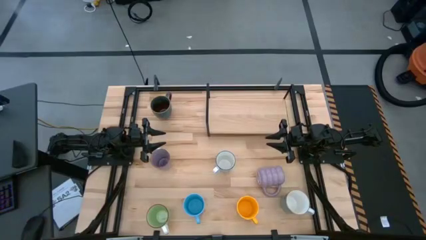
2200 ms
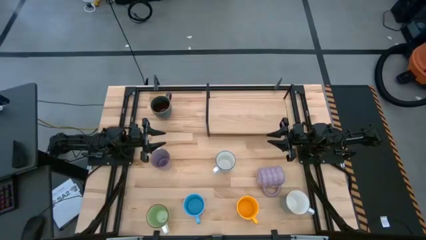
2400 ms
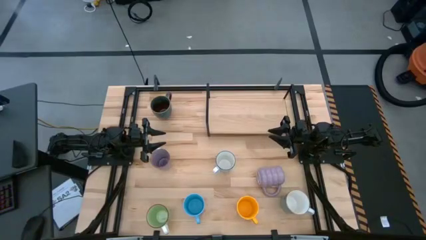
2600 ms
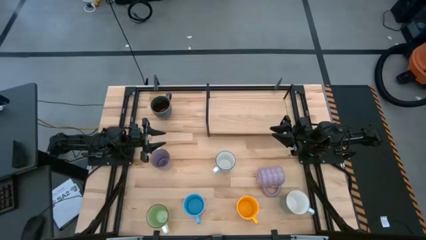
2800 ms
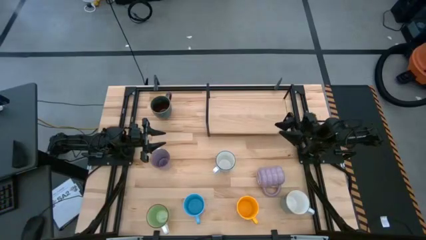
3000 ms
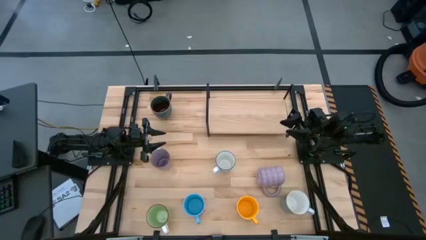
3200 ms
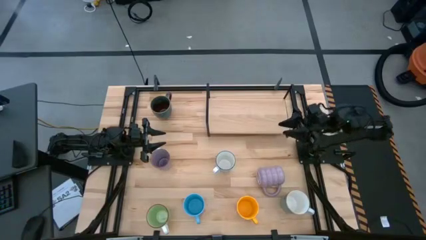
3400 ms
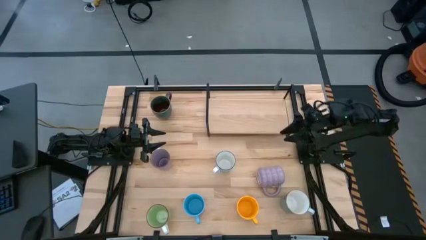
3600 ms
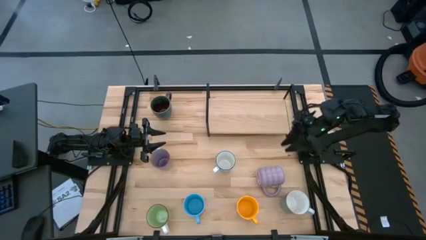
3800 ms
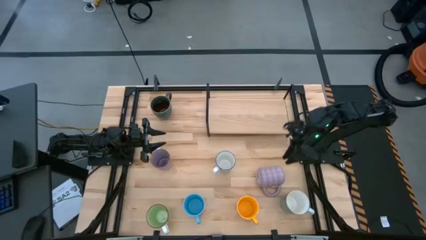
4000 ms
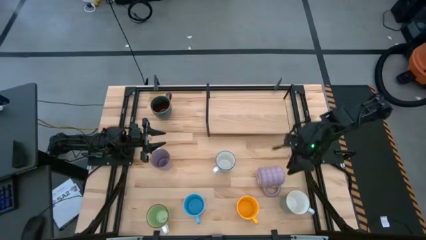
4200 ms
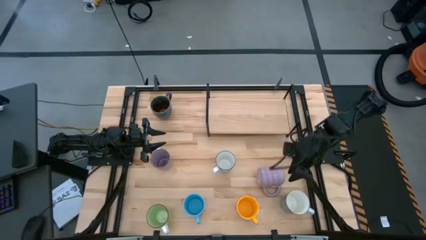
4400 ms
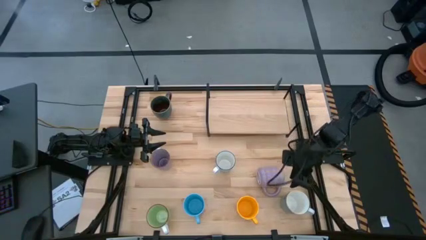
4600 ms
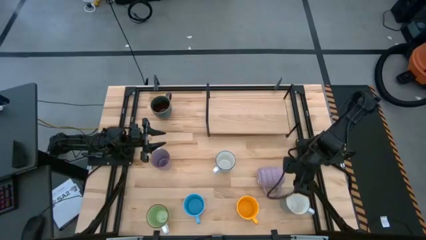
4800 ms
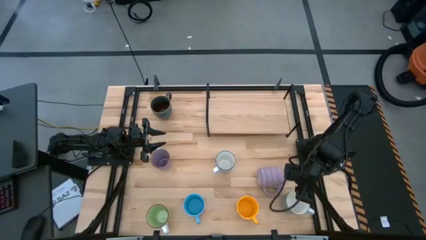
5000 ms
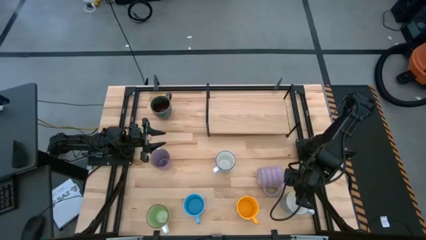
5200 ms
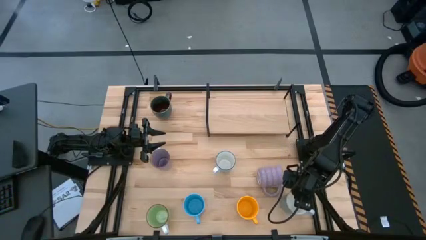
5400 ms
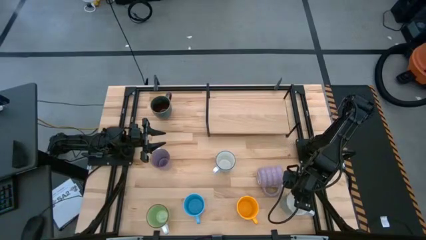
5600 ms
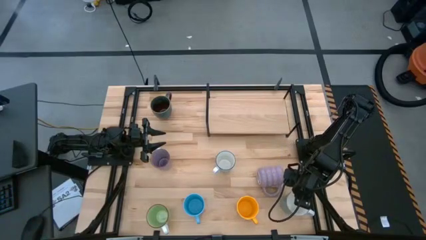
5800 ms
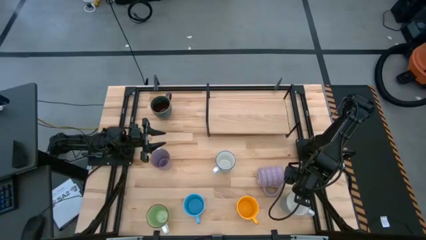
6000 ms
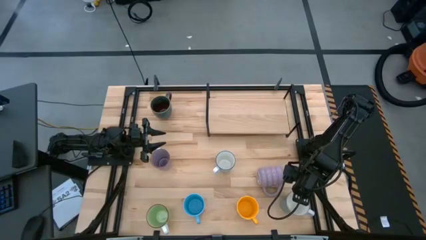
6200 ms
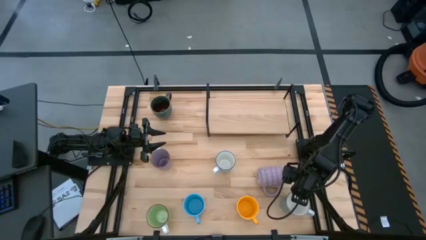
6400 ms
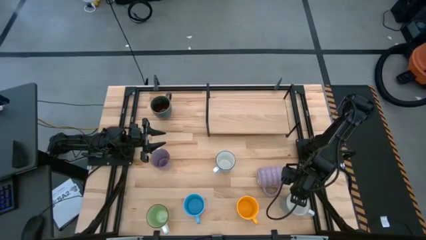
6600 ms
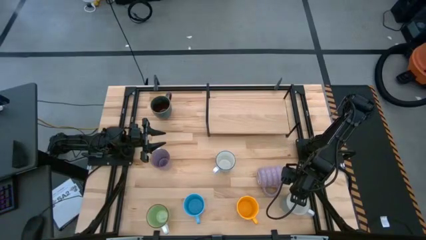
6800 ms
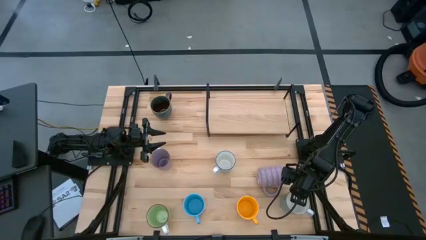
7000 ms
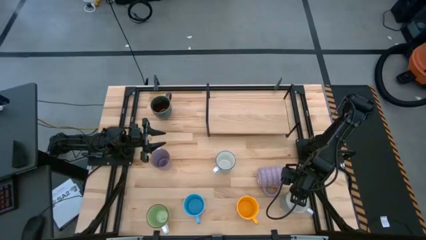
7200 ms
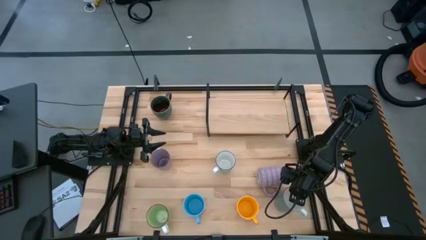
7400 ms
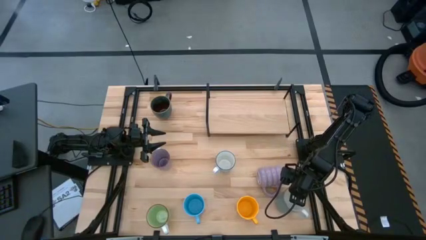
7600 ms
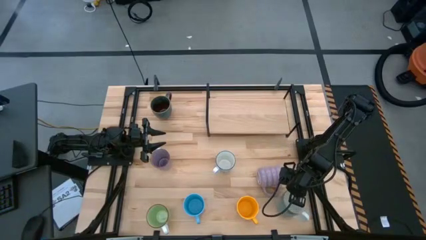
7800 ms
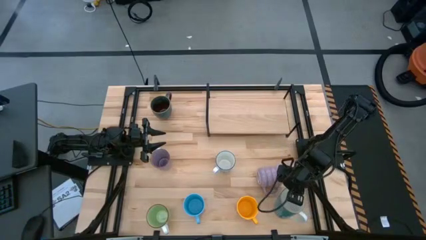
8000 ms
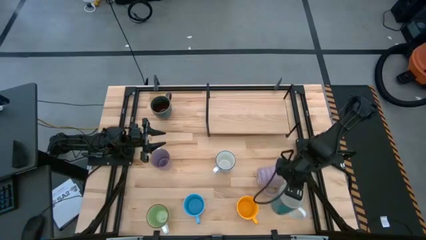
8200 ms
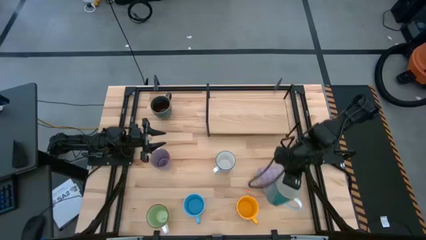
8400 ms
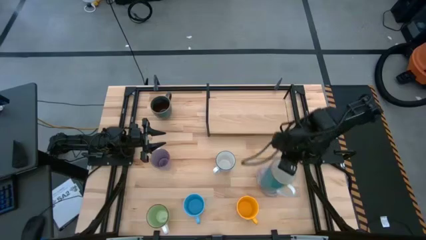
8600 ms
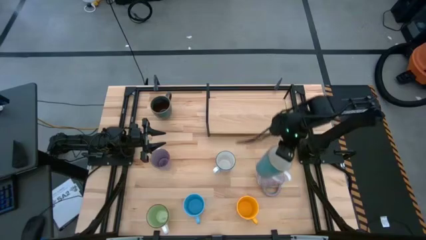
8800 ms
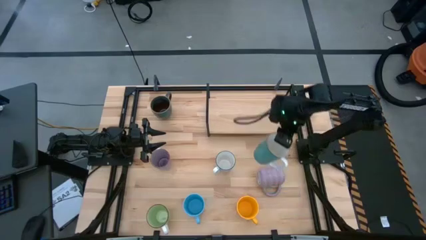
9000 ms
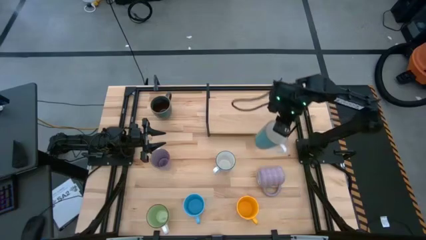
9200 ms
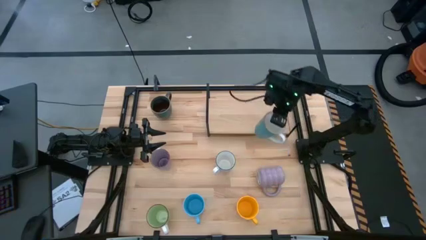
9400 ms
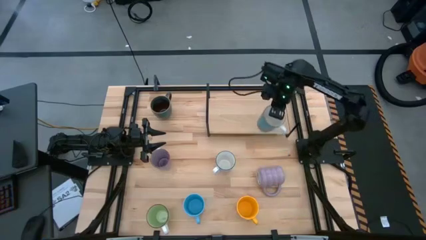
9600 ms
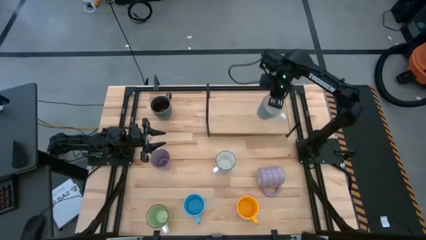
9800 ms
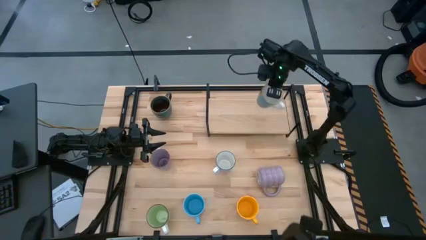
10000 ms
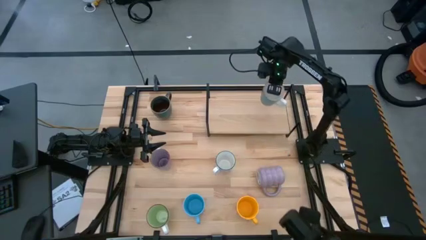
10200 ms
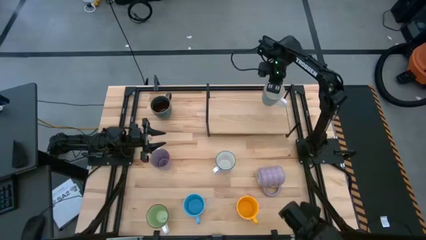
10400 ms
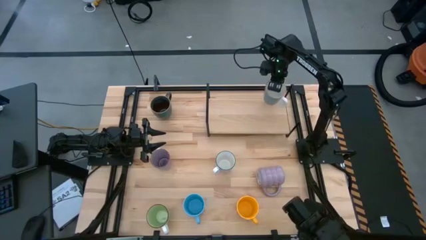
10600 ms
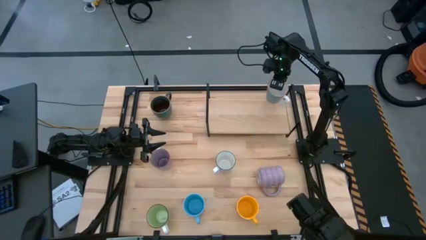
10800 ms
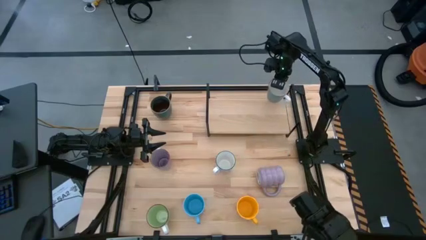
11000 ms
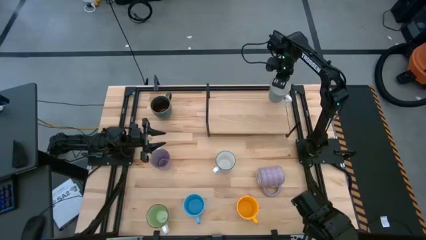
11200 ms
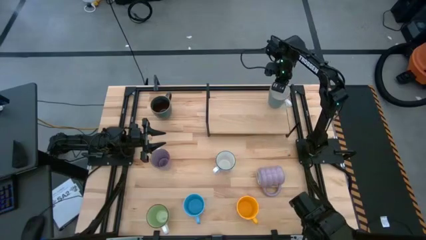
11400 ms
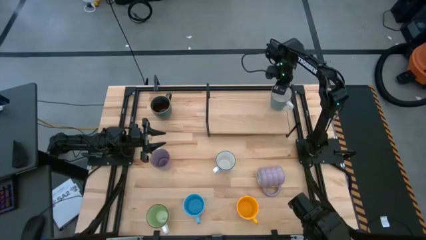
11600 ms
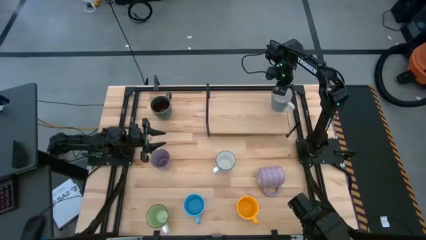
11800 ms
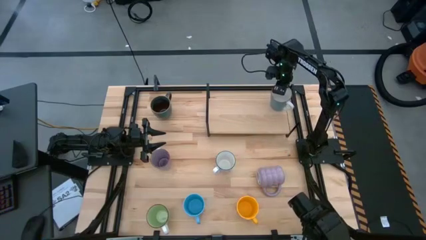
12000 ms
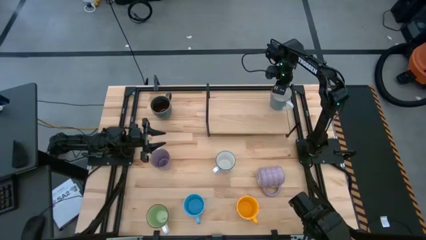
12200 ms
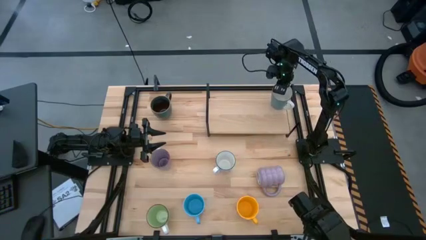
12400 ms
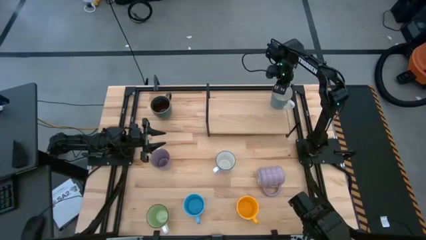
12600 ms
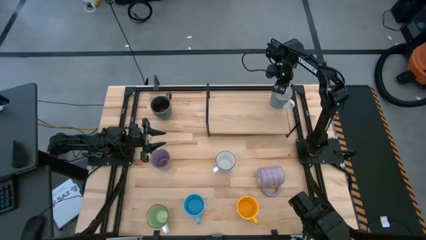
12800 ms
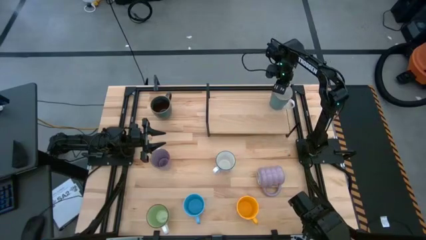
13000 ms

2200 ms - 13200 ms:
Task: Place coffee mugs
Put the light blue mug on the shelf

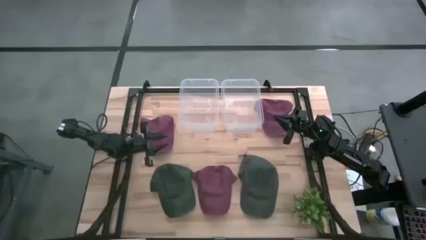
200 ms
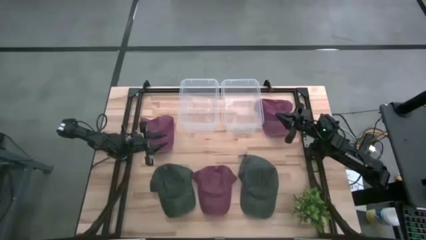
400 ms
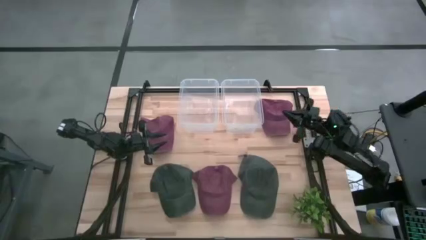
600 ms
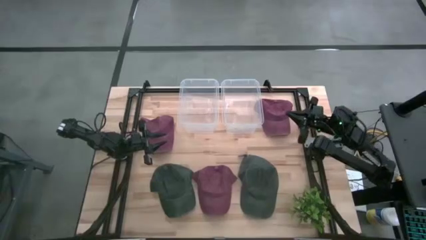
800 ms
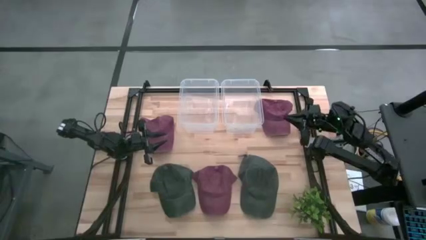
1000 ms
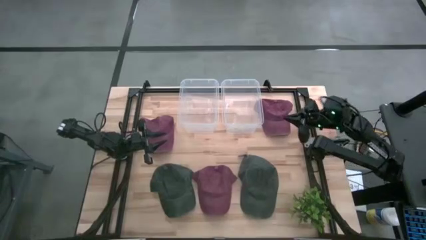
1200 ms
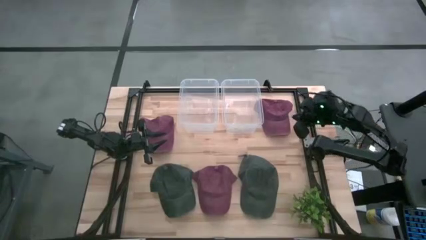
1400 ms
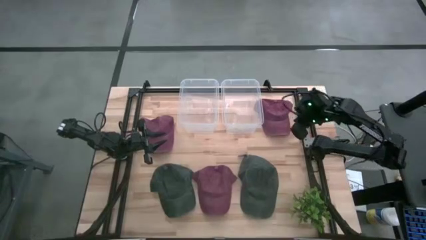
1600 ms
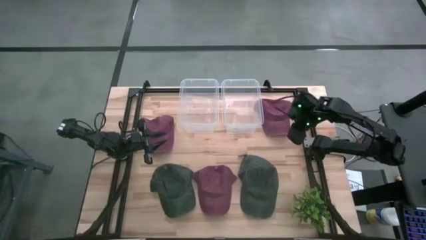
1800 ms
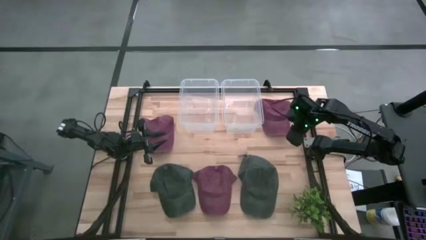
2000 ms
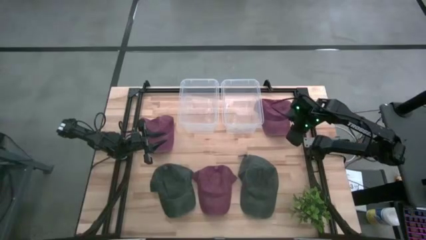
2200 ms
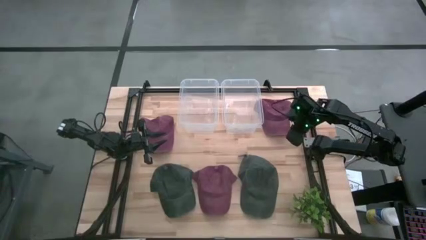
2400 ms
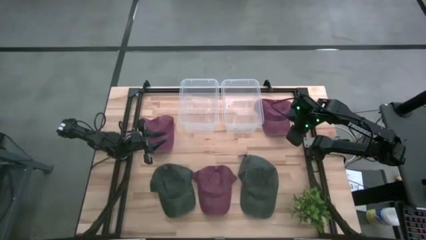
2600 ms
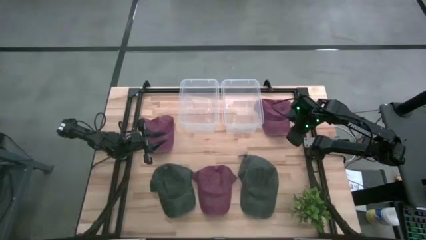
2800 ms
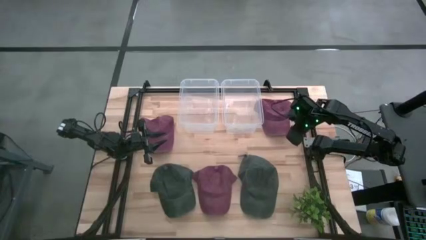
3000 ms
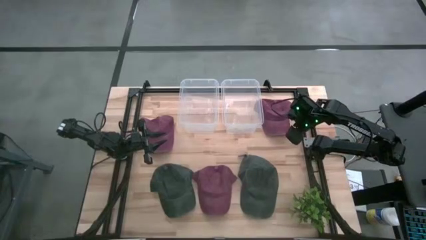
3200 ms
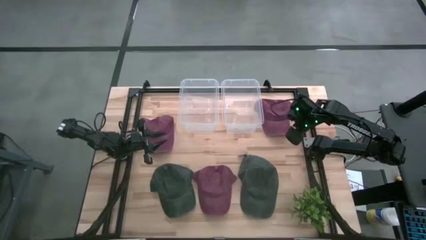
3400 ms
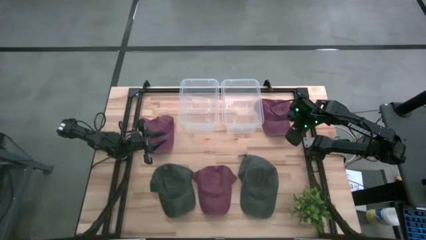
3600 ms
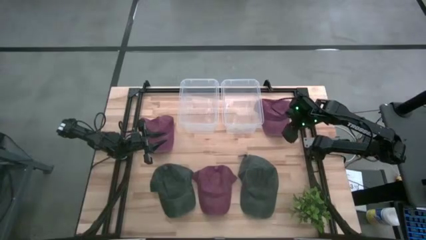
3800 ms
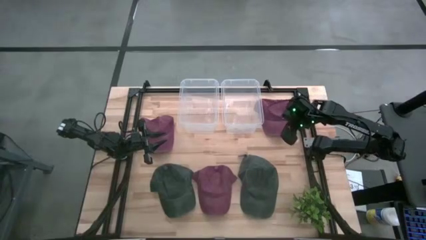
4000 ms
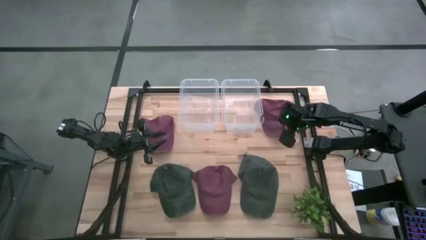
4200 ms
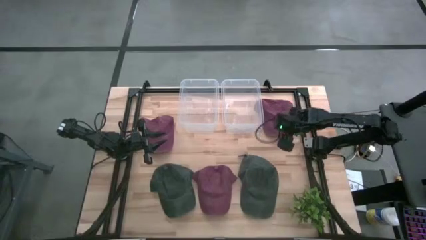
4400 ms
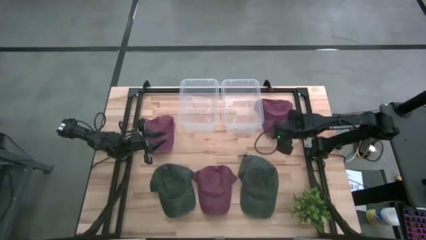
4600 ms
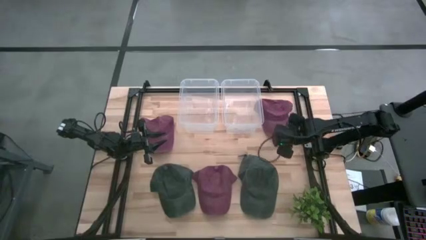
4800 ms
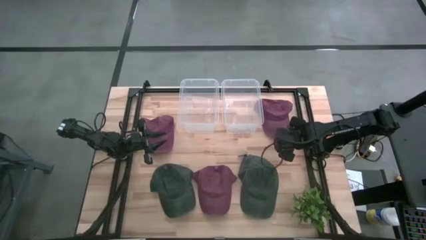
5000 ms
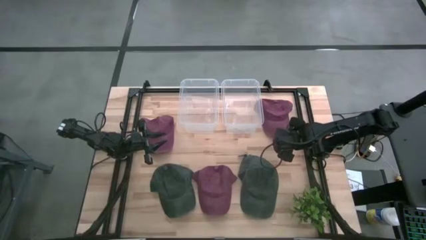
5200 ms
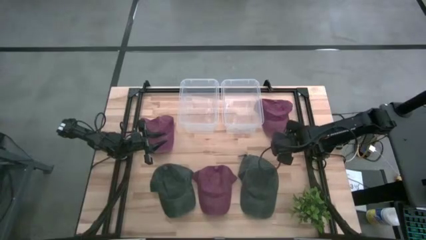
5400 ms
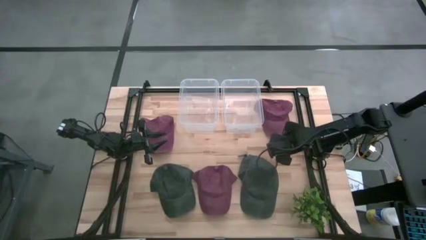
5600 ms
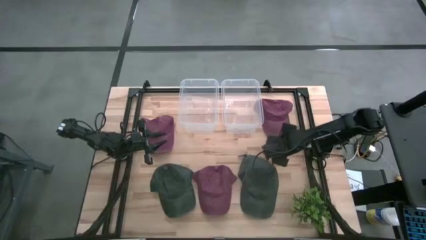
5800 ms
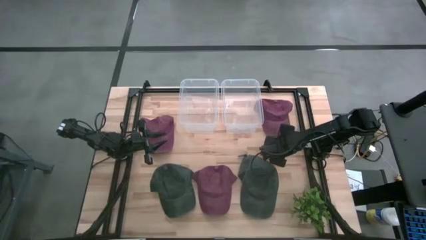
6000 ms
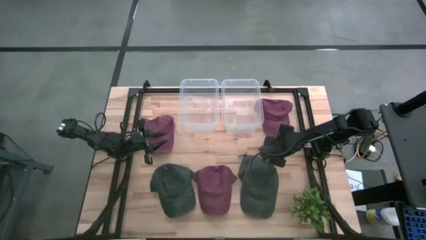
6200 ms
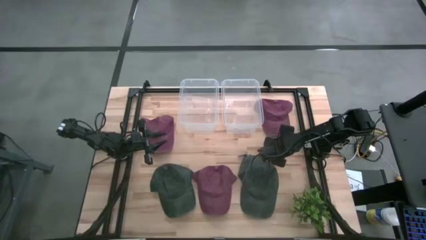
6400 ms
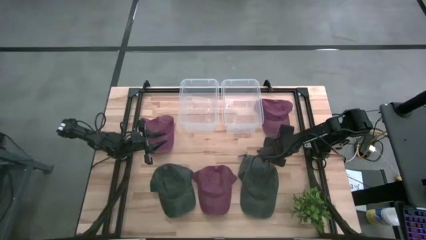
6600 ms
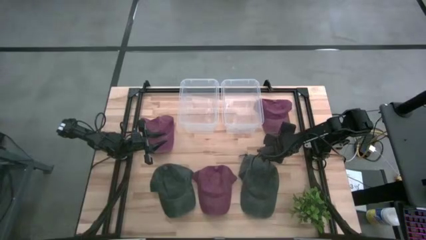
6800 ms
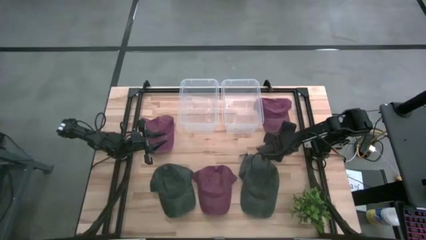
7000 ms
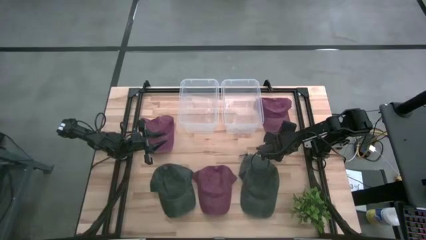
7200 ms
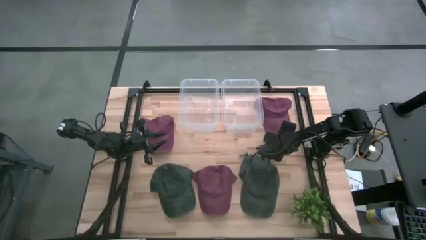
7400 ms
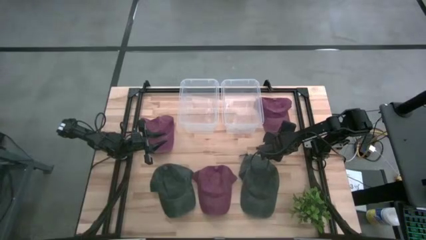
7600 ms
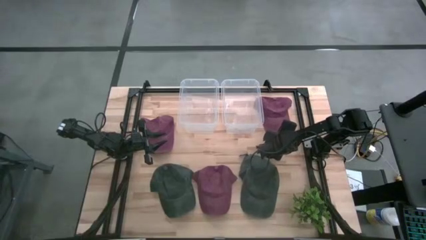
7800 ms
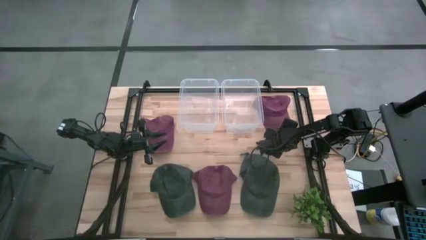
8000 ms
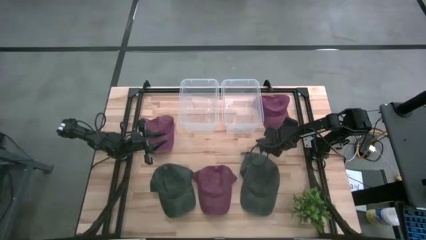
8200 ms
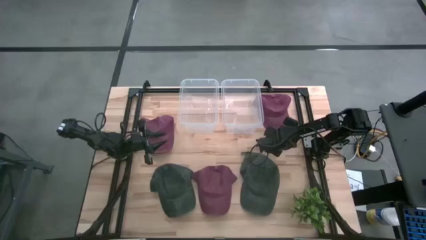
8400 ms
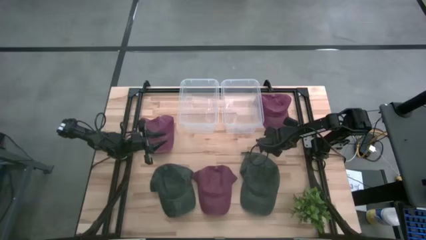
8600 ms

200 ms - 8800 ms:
Task: Pick & Place hat
Put the top right red cap into the right transparent bin
